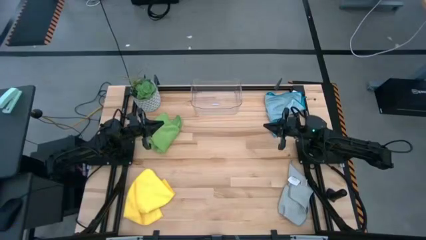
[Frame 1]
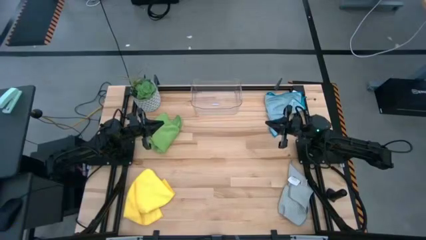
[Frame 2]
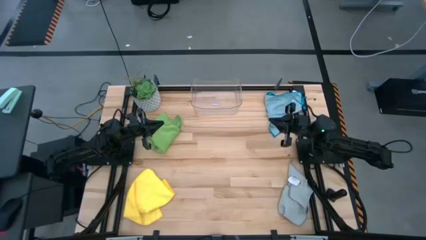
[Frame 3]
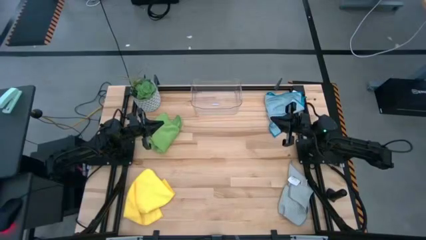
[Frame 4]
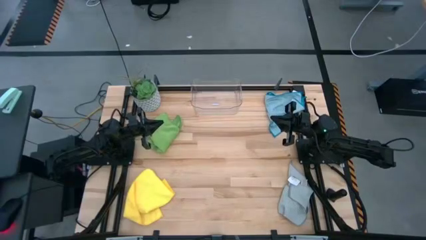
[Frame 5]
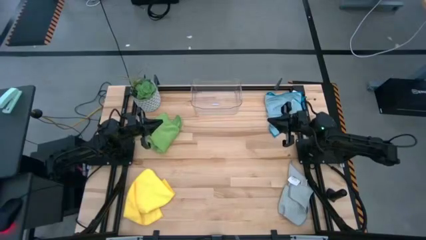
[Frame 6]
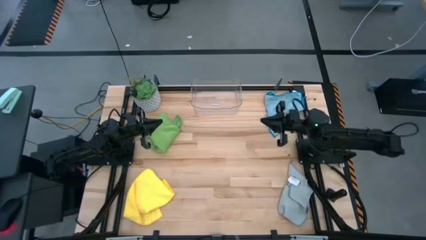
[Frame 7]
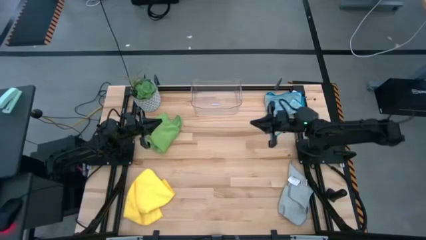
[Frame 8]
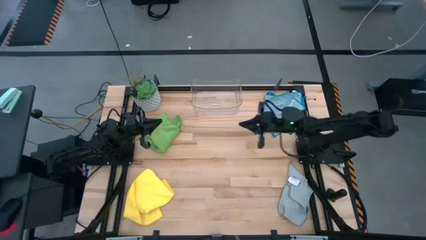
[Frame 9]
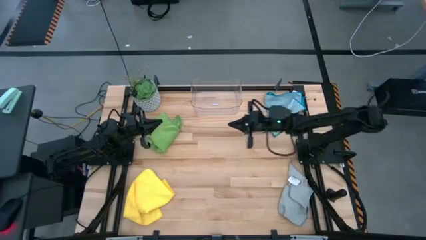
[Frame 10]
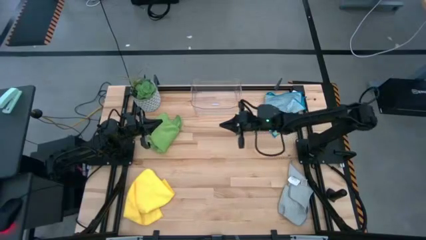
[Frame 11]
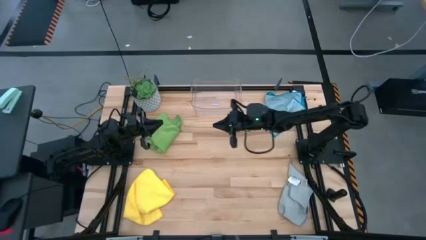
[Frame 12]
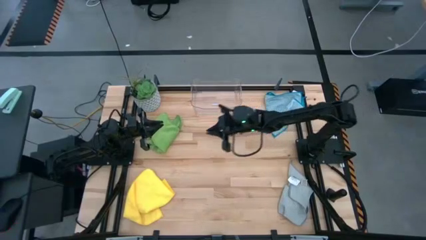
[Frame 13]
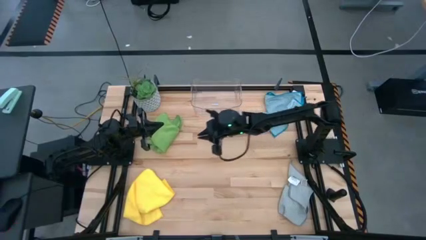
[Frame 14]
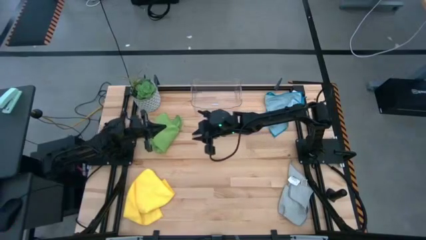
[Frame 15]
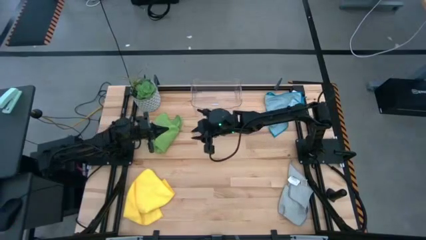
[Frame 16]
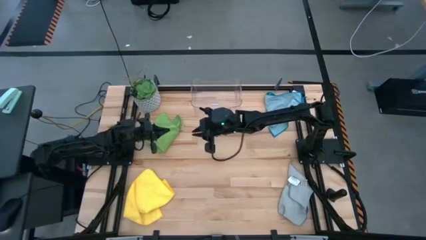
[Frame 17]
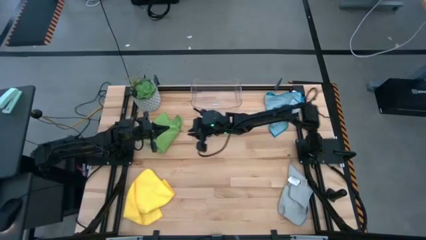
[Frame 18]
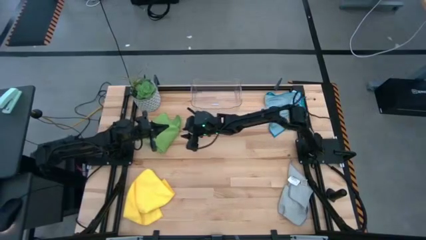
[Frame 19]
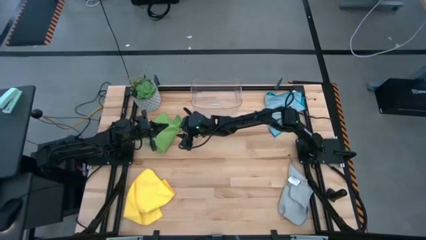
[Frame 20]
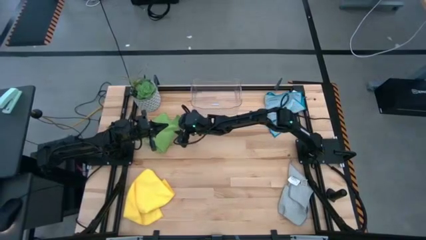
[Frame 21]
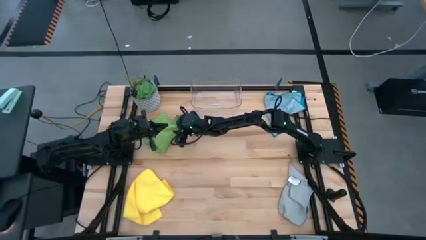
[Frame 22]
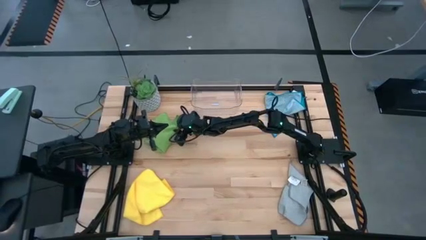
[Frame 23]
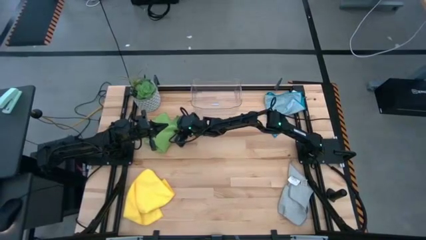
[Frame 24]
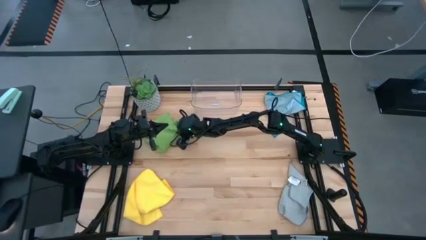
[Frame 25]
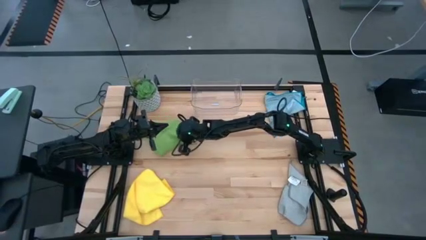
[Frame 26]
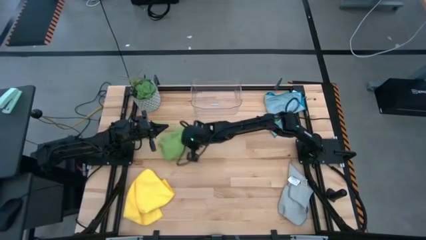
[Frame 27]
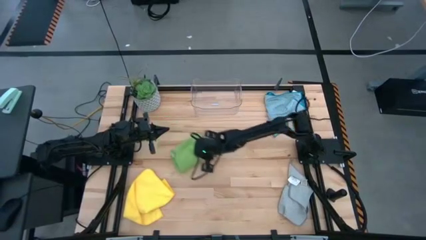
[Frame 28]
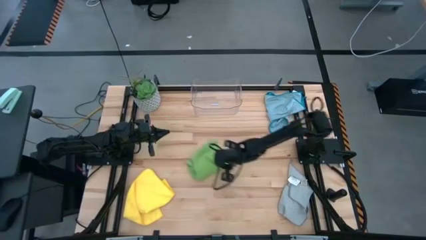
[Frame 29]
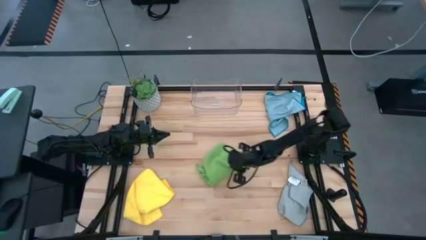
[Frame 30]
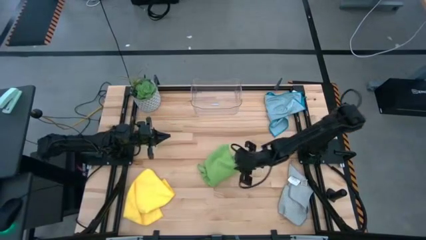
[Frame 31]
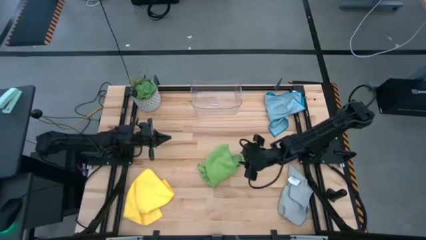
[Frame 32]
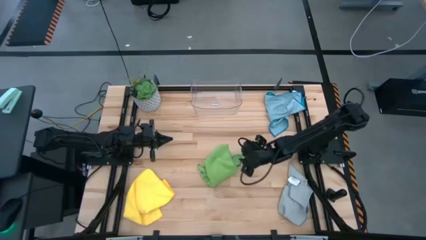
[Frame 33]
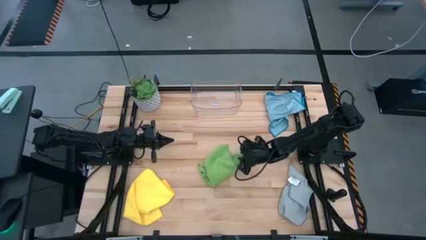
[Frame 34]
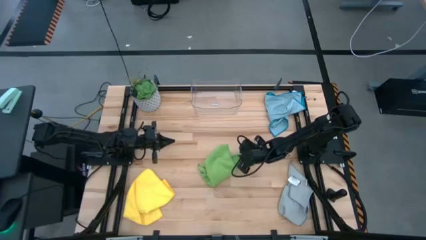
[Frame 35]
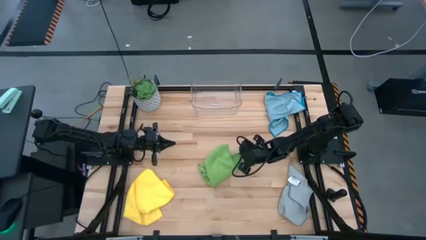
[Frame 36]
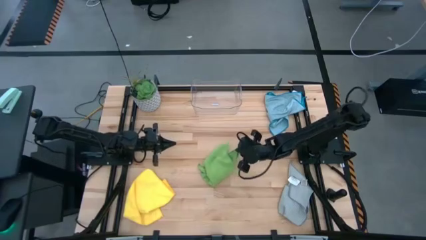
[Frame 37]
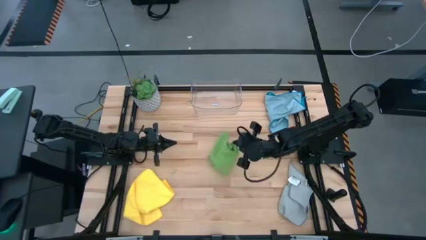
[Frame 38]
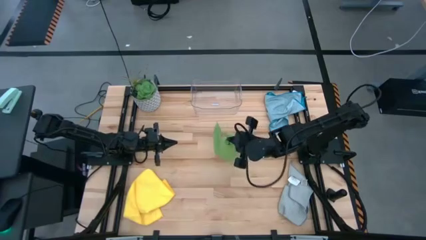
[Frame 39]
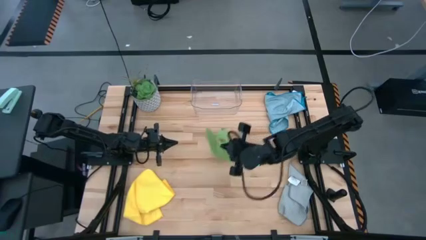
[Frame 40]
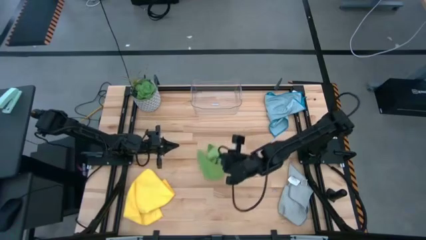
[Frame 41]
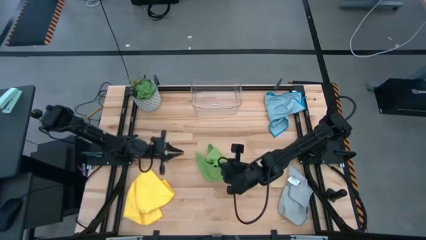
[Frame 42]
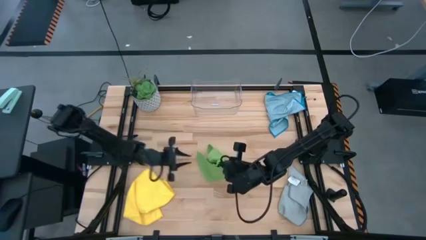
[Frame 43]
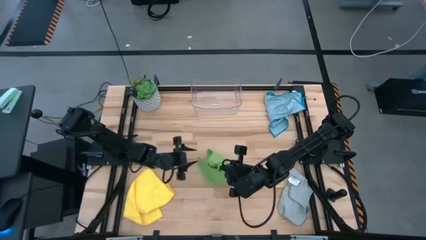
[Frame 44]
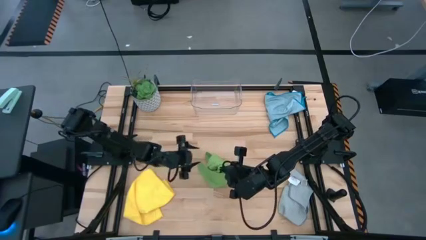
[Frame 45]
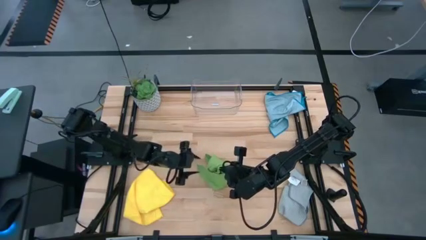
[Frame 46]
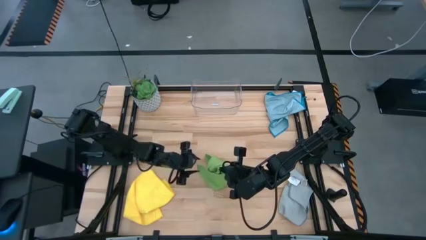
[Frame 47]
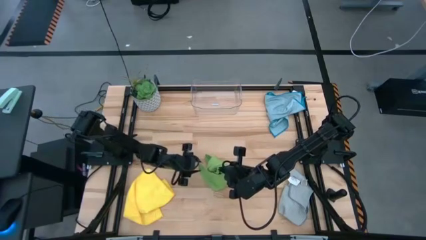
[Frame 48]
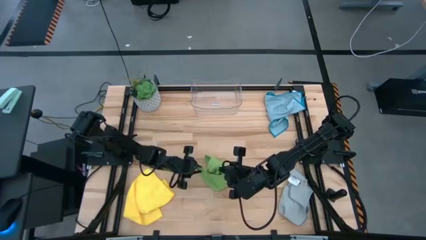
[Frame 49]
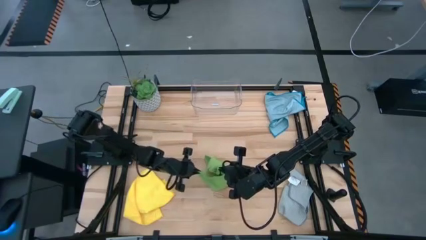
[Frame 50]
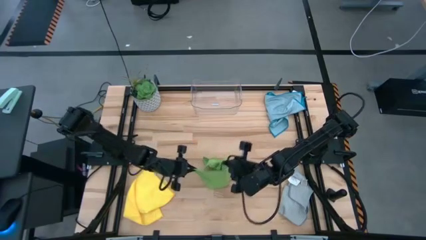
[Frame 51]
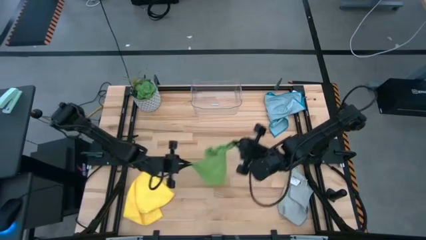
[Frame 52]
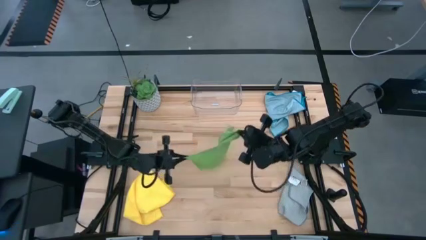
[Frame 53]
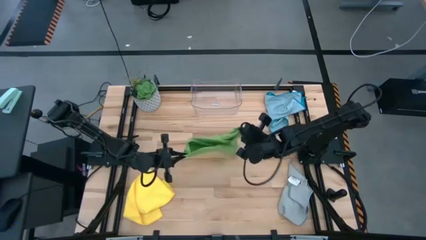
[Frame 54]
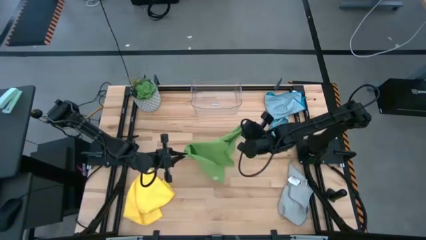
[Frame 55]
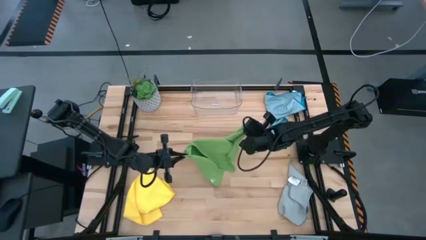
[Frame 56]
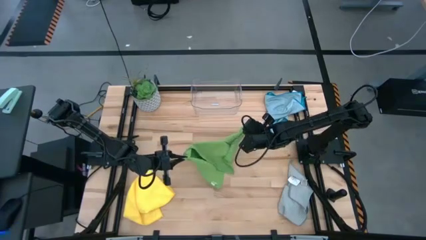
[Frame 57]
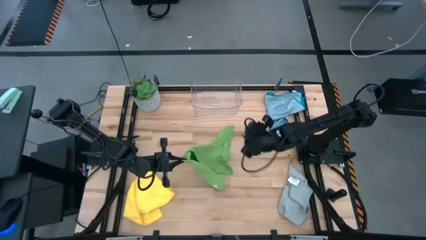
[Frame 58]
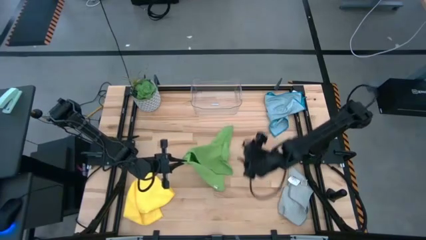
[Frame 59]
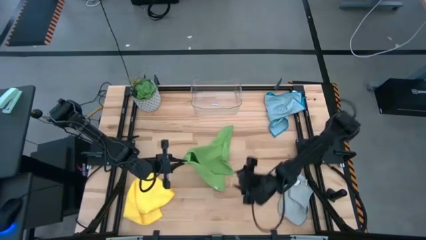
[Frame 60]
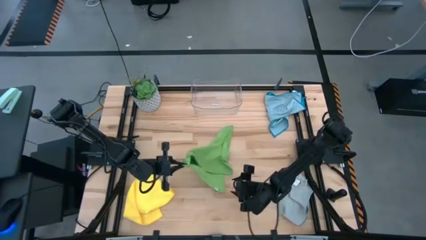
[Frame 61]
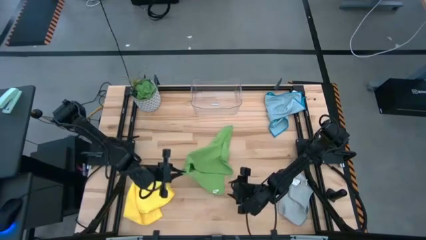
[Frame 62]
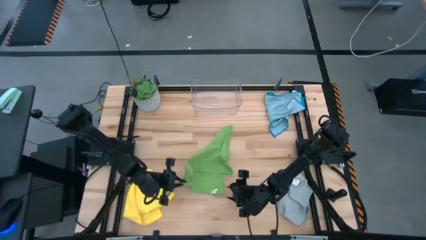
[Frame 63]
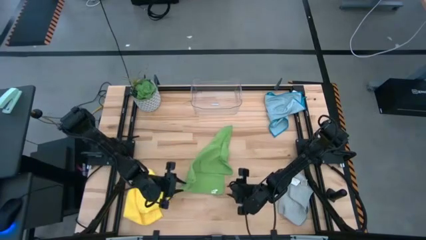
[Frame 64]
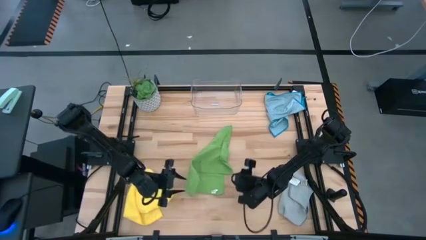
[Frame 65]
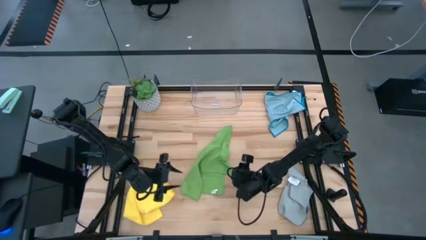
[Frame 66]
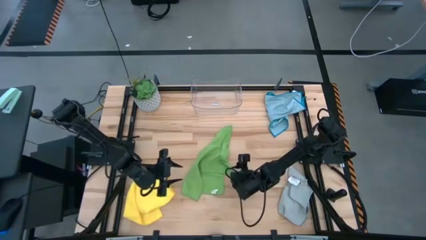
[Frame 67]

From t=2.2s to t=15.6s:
Task: Fold microfiber towels
Fold the green microfiber cloth

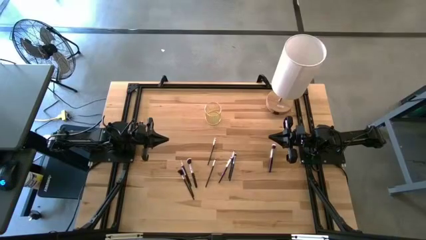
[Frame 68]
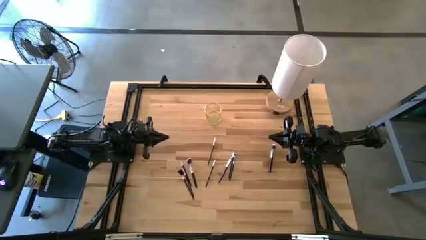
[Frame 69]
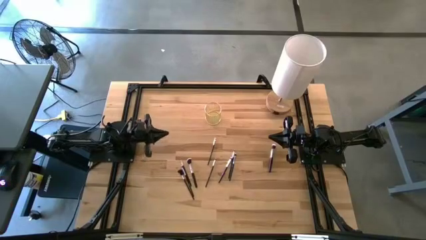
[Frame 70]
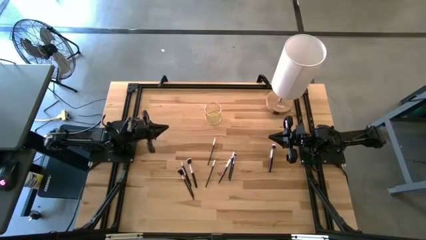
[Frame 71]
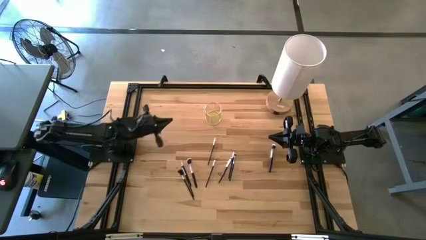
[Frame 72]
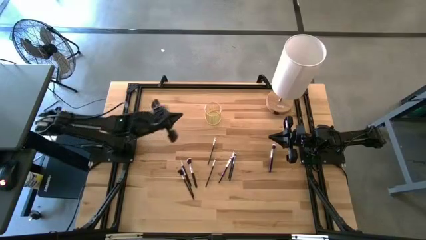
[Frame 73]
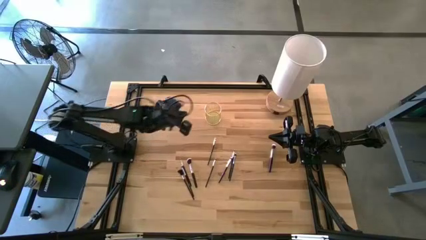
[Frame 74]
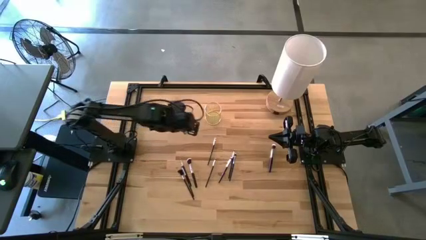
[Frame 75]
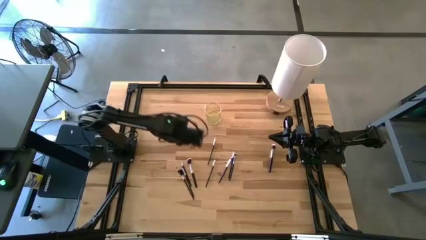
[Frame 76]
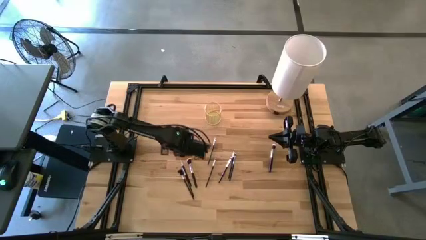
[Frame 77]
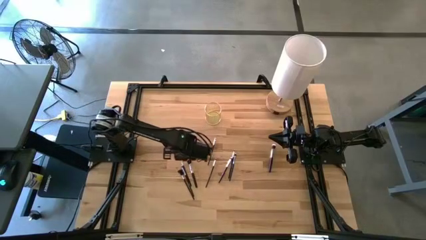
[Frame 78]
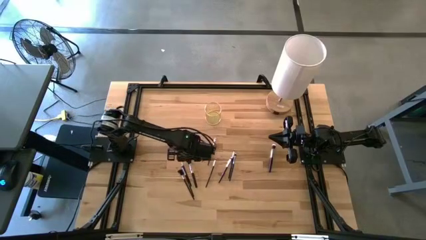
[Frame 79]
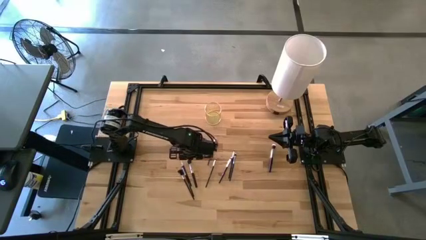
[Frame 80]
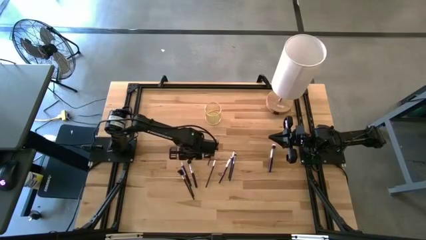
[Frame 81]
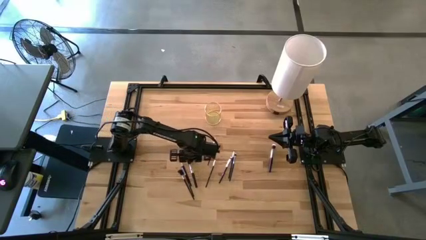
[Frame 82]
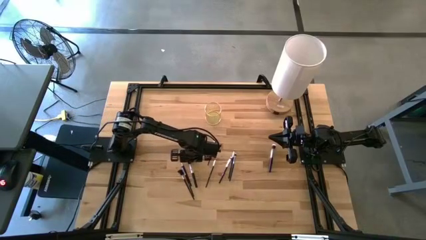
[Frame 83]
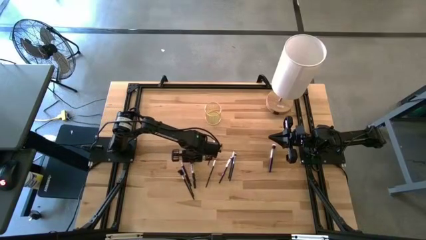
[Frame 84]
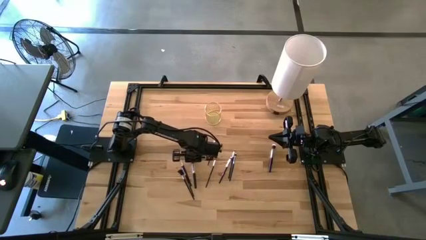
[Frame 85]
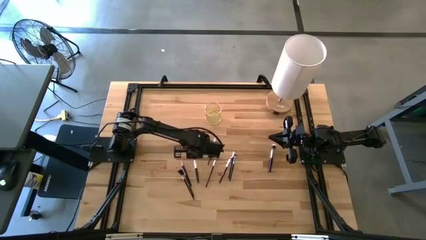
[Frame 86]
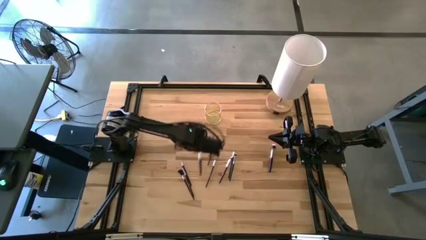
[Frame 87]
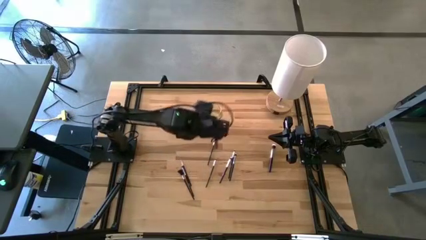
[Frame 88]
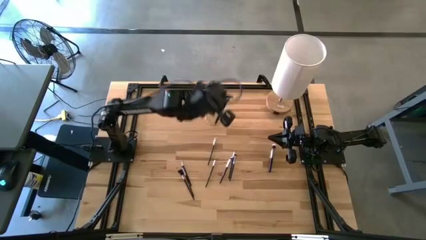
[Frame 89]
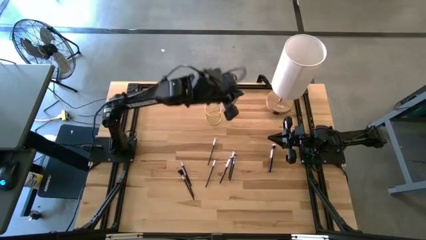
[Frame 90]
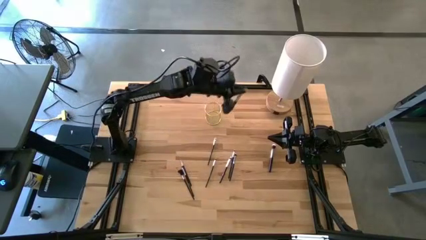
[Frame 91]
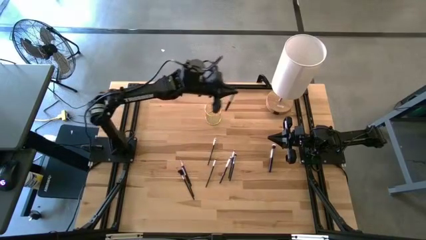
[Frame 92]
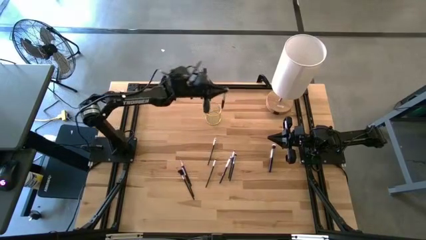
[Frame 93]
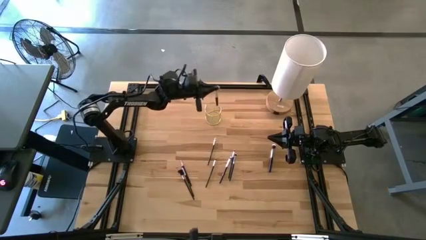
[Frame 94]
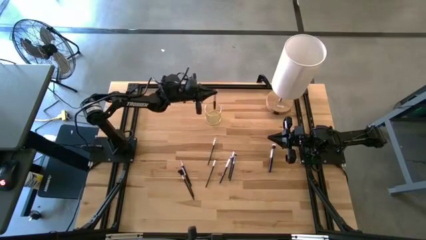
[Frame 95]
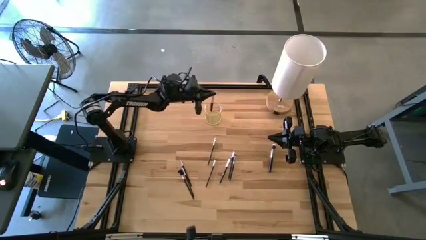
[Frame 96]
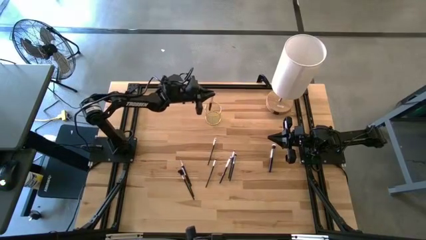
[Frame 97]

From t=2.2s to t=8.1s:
Task: Put items in baskets/containers
Put the powder brush into the pen holder
